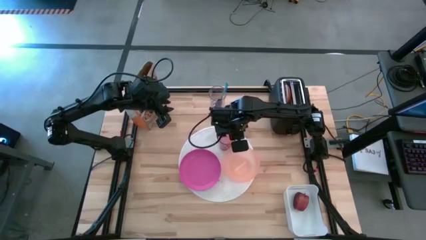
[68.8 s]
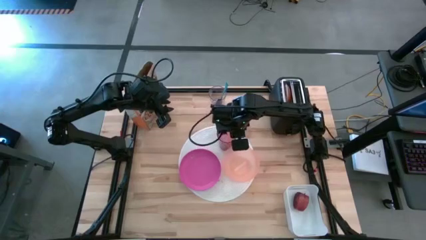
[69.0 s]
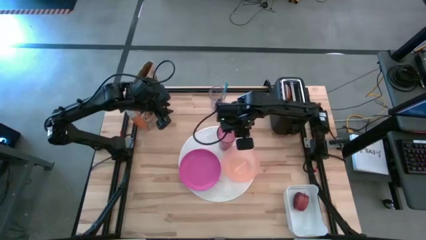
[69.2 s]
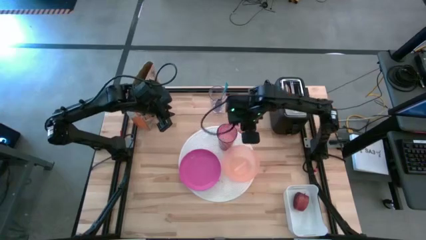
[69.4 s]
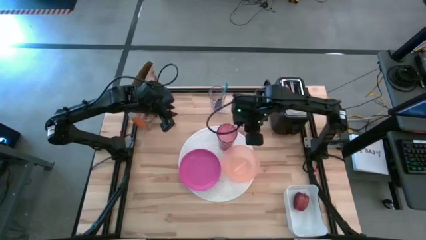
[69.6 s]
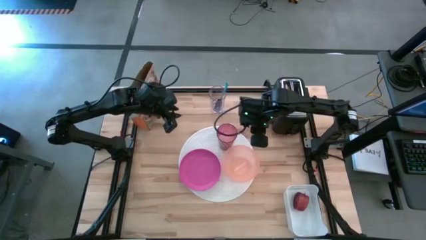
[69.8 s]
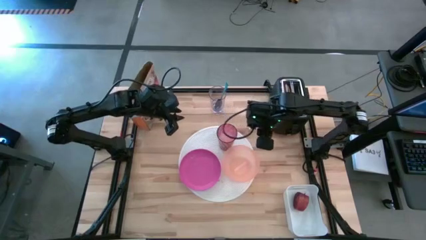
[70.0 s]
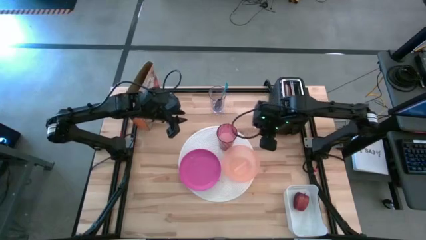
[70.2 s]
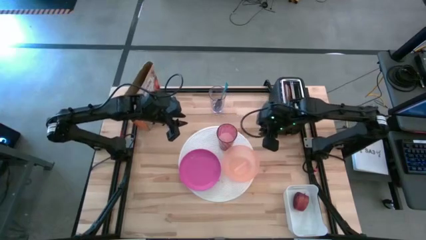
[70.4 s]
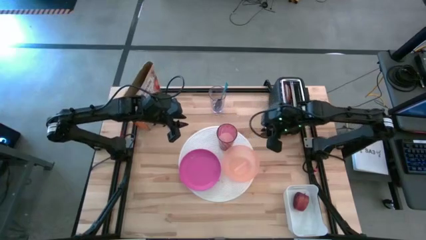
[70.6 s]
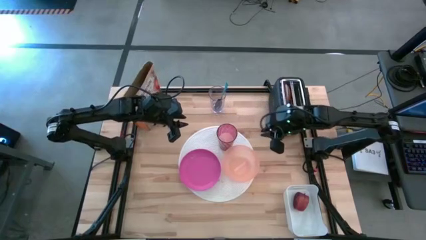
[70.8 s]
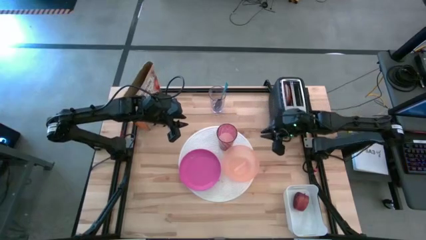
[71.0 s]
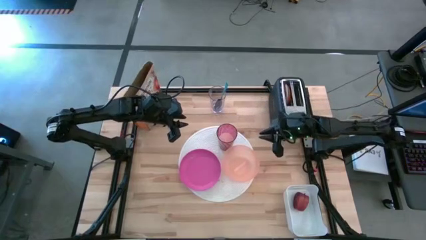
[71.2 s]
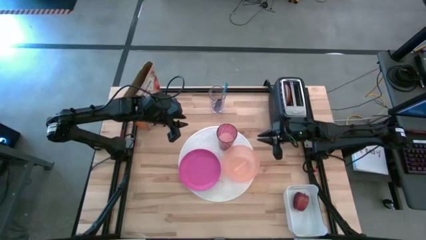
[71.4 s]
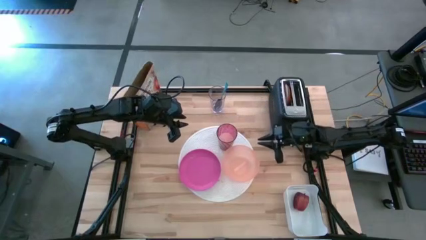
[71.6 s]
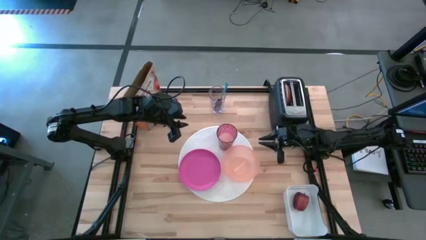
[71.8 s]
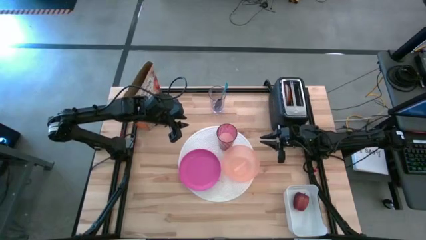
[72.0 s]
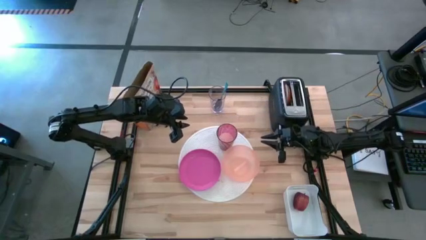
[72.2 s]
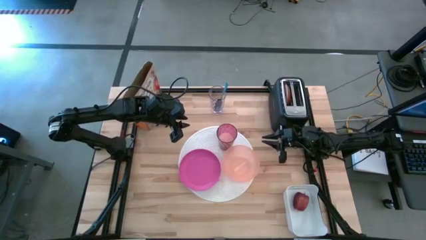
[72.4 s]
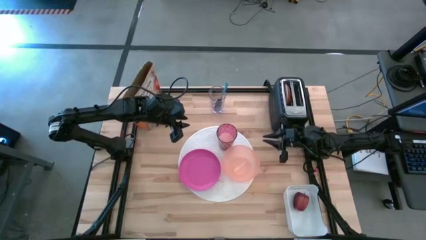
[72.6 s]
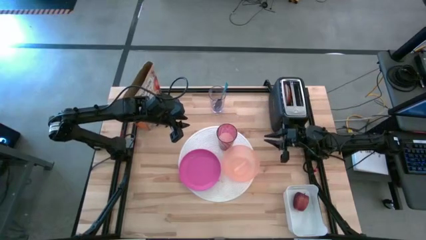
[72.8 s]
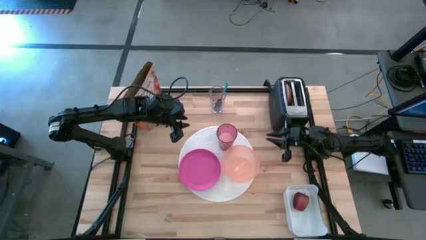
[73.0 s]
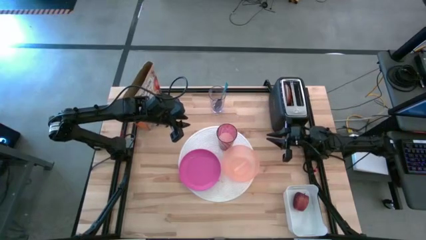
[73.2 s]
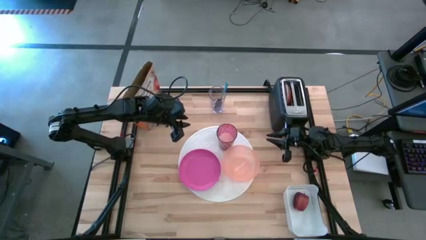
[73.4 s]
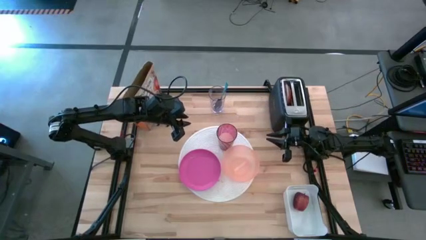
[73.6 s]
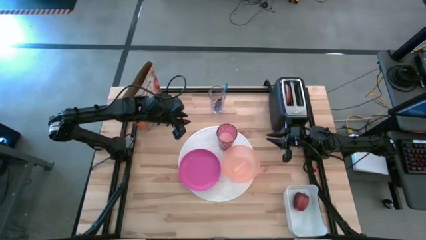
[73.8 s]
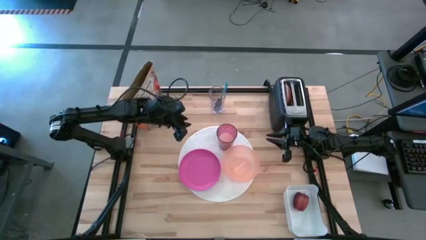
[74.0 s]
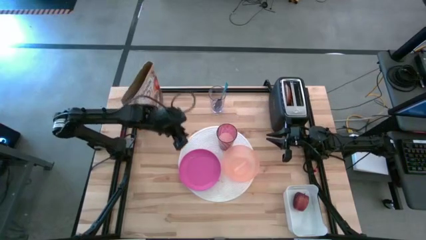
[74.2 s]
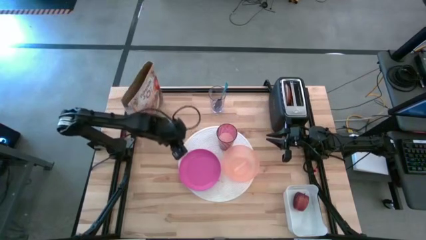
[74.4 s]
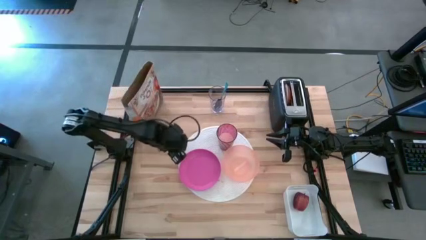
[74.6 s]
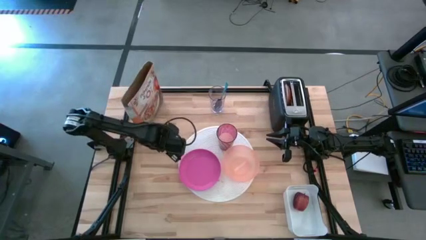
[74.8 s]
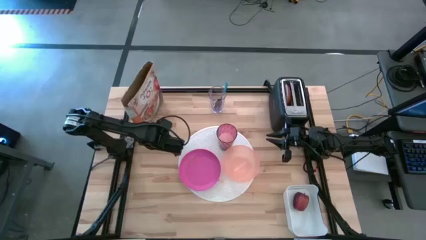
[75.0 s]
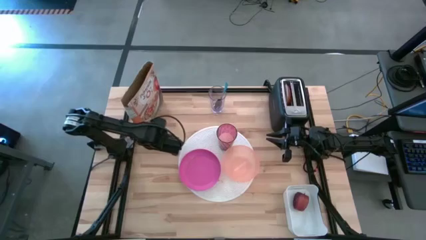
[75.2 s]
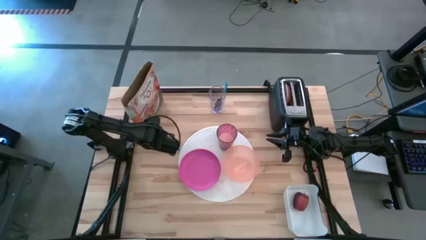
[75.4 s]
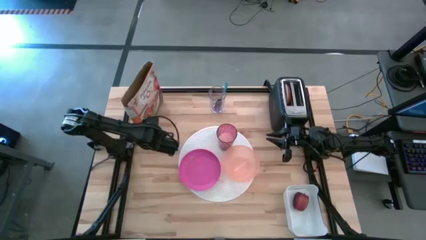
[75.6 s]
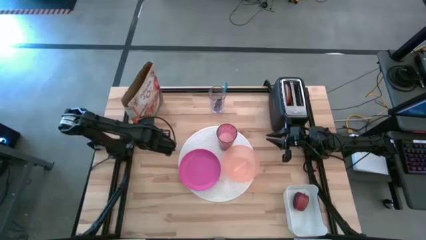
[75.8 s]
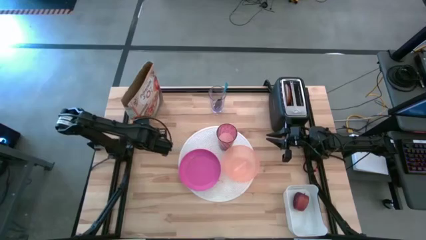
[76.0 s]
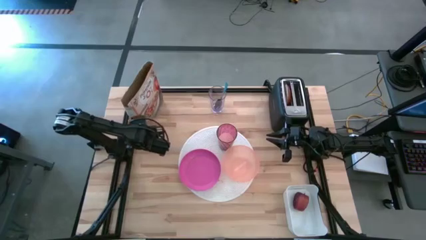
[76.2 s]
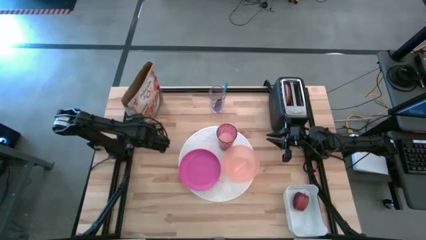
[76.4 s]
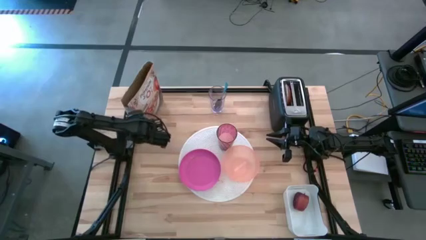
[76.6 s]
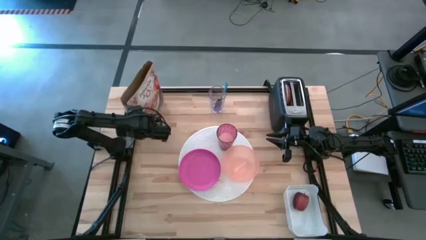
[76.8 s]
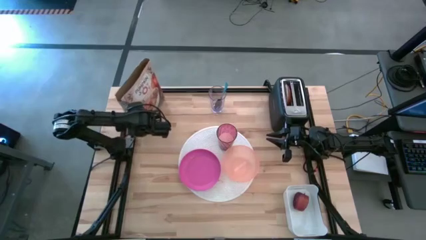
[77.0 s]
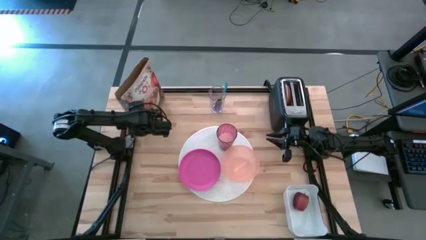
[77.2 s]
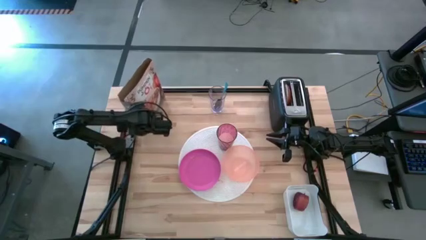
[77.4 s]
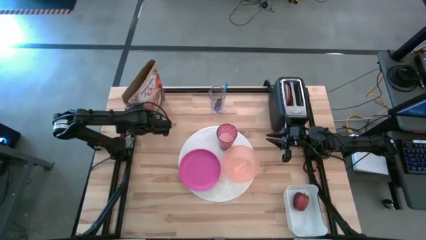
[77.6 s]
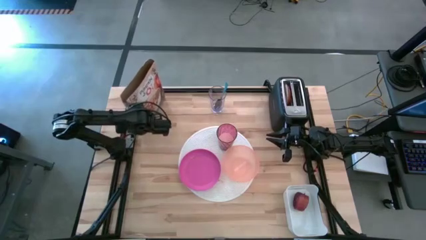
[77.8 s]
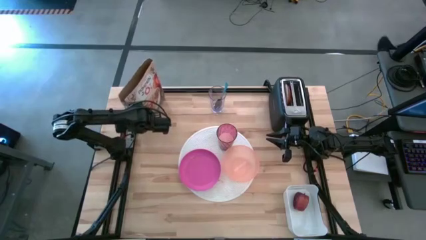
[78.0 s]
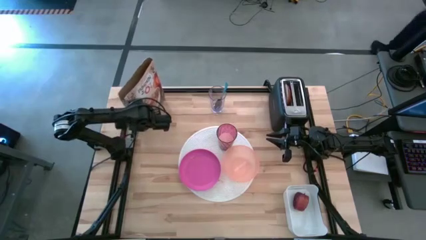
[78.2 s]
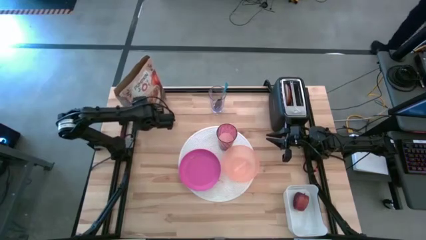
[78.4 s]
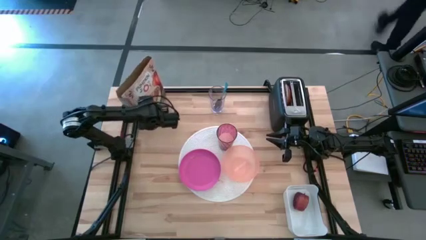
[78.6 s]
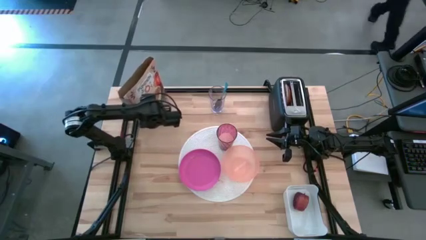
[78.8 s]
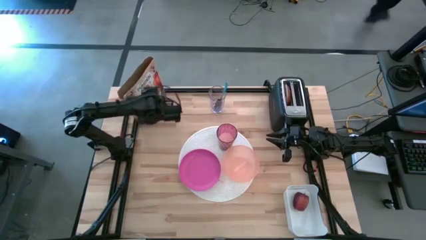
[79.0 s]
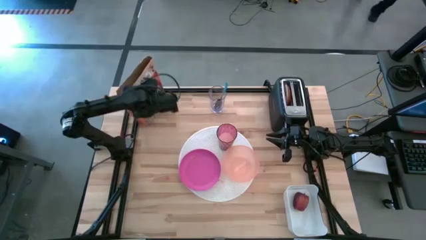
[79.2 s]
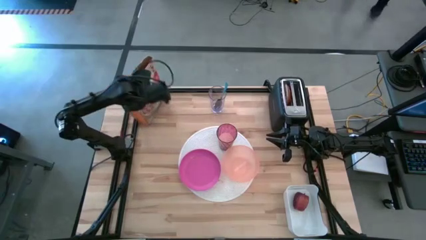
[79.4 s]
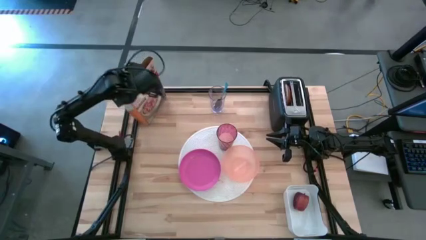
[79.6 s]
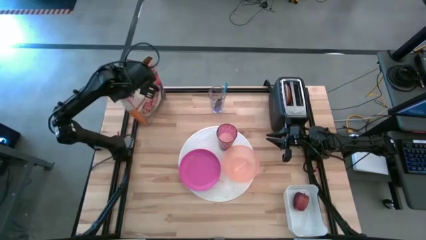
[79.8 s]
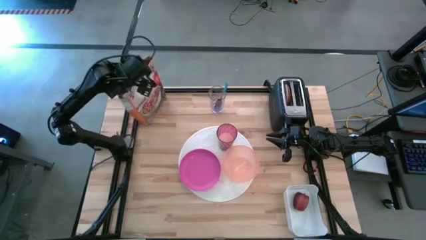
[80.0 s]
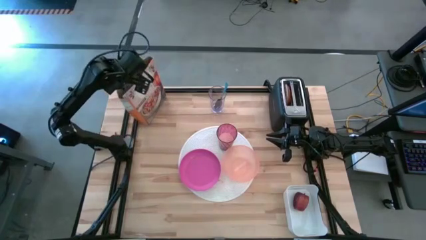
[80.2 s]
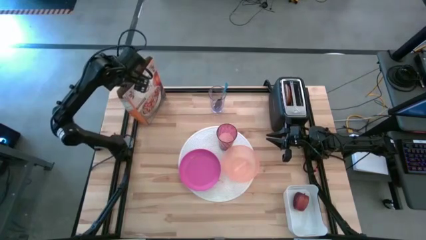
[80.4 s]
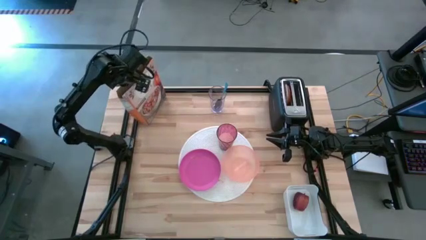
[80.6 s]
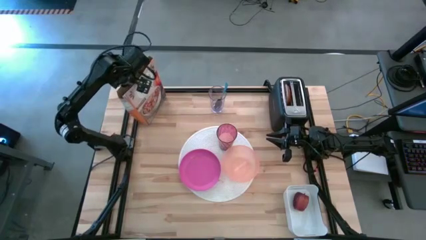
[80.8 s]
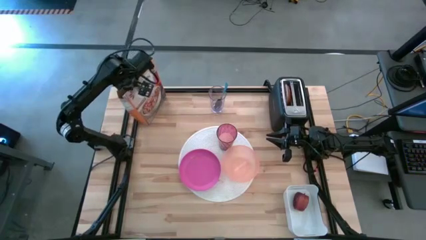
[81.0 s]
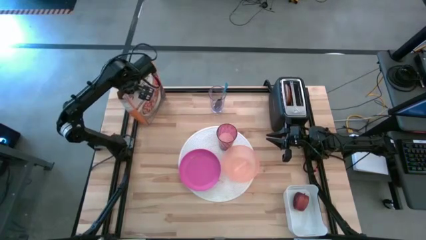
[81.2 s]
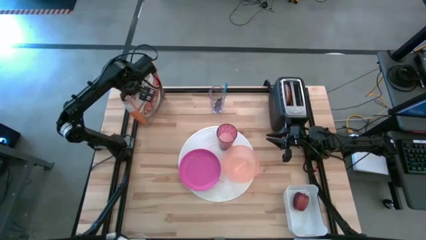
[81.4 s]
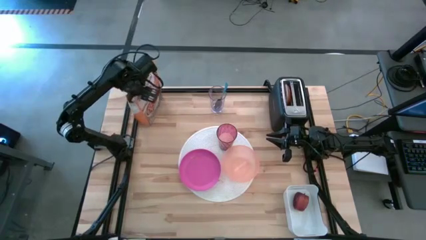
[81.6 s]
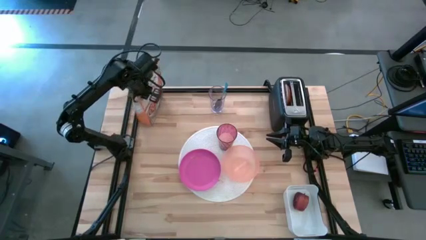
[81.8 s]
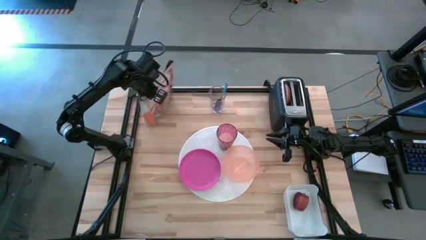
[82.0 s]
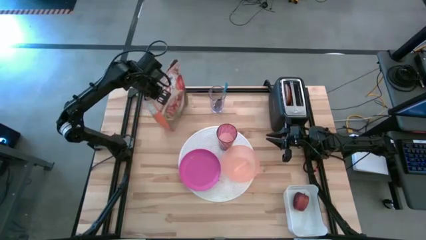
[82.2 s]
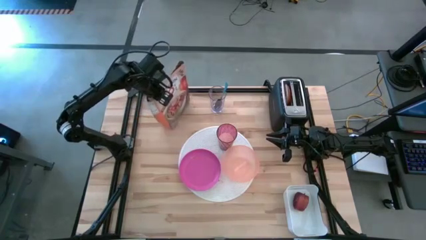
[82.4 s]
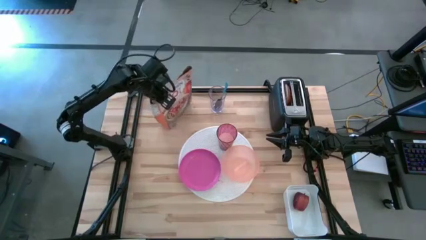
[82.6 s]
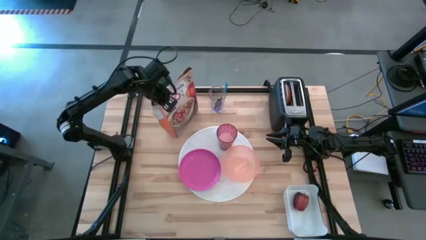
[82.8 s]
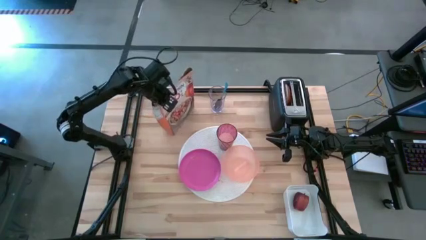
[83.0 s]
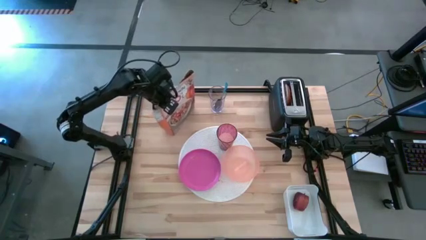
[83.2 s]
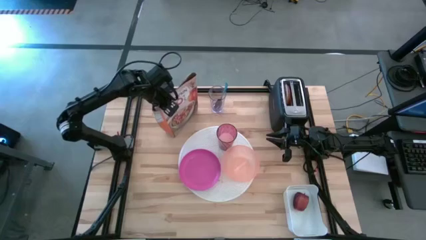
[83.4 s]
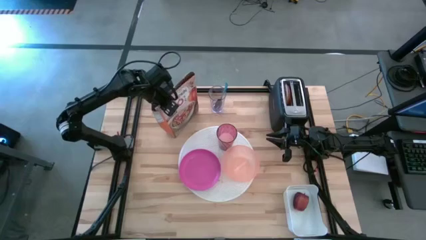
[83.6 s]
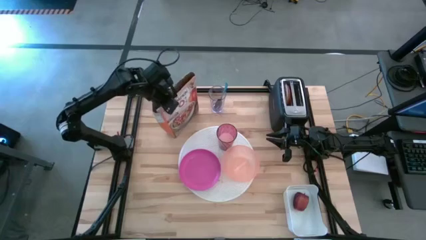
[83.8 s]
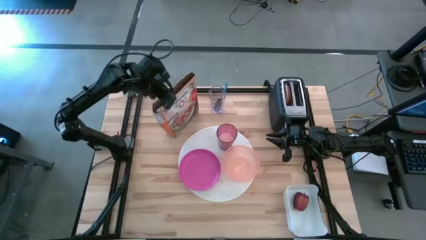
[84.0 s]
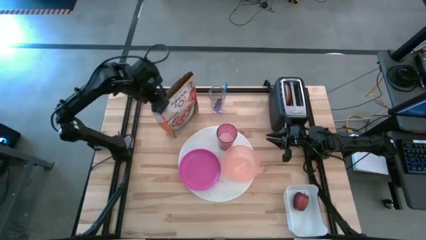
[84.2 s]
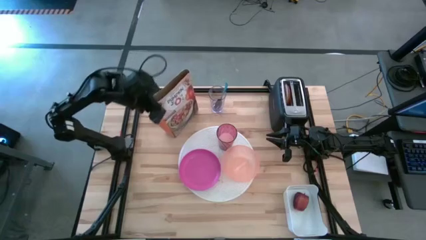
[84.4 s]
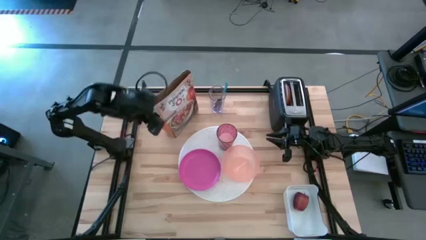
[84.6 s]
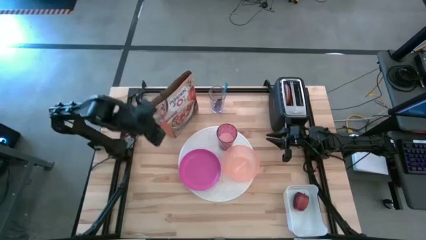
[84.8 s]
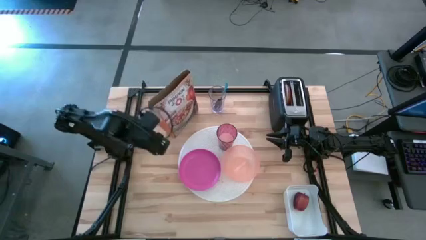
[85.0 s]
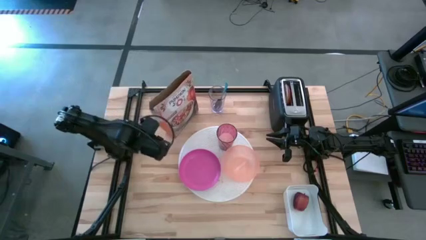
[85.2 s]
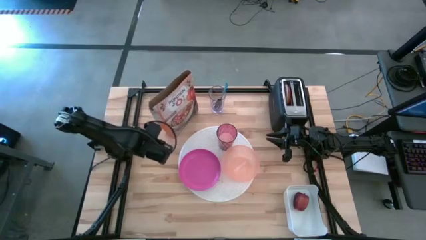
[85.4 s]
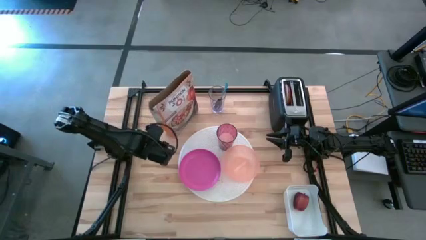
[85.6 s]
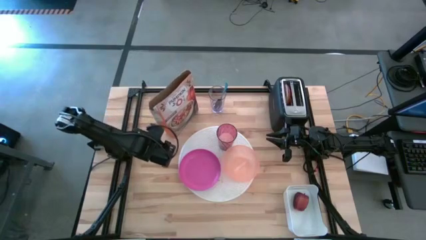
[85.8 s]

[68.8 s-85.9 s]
Task: Arrange a breakfast setting
Pour the cereal from the cereal box into the orange bowl
